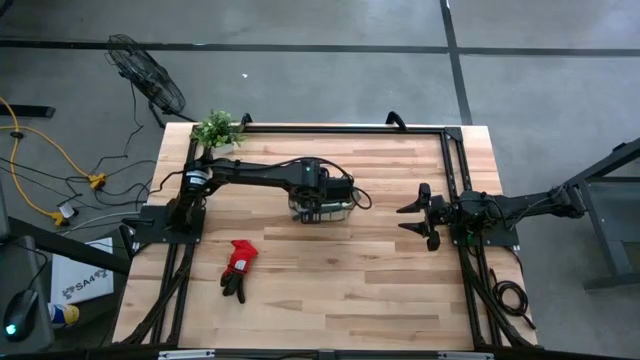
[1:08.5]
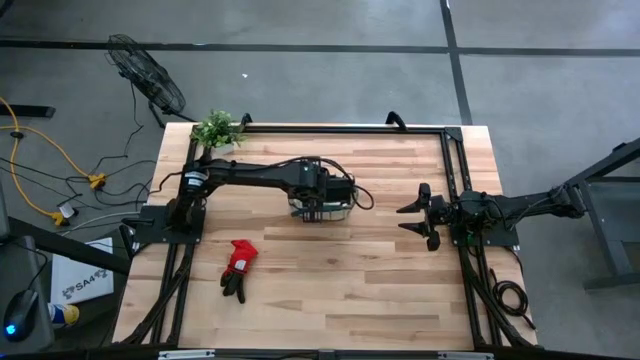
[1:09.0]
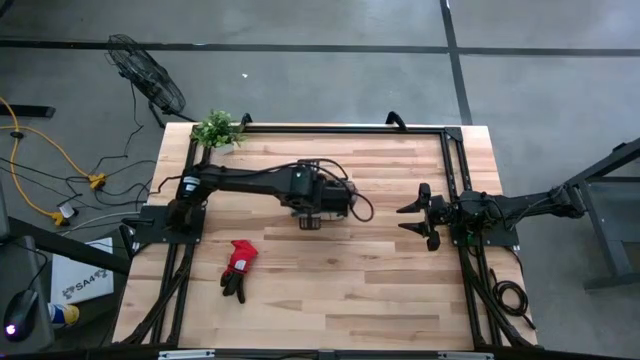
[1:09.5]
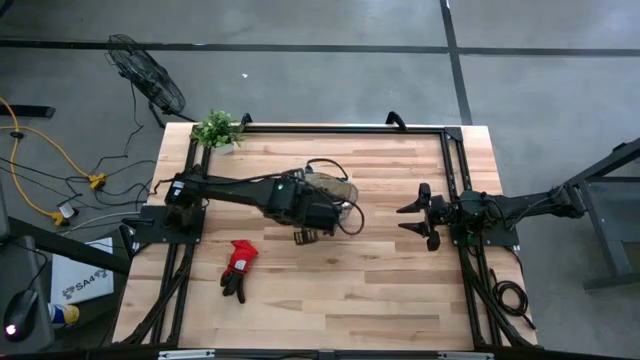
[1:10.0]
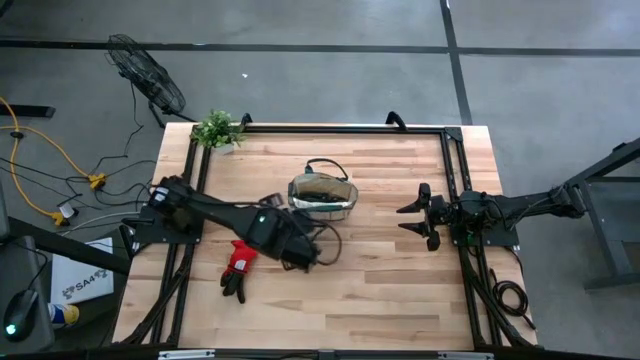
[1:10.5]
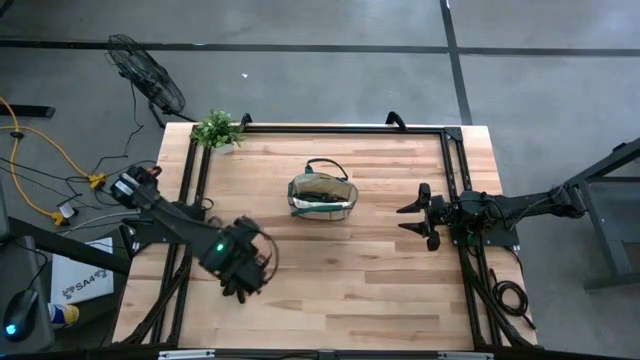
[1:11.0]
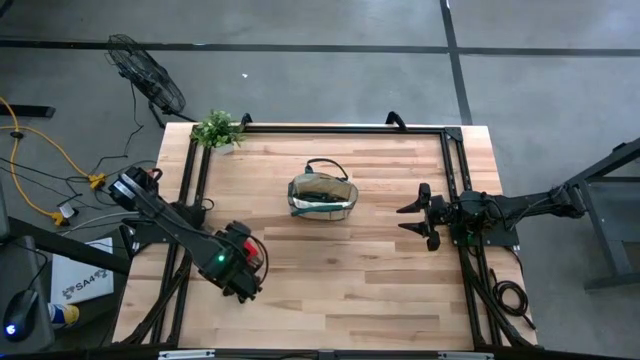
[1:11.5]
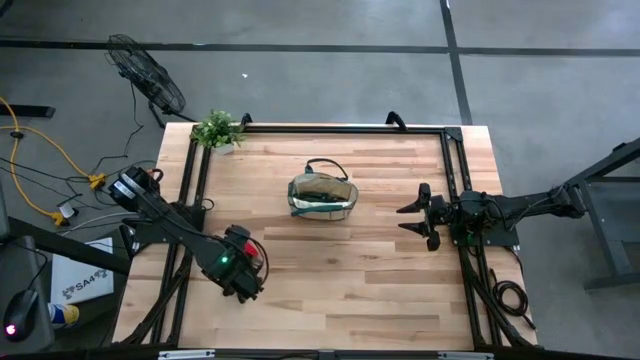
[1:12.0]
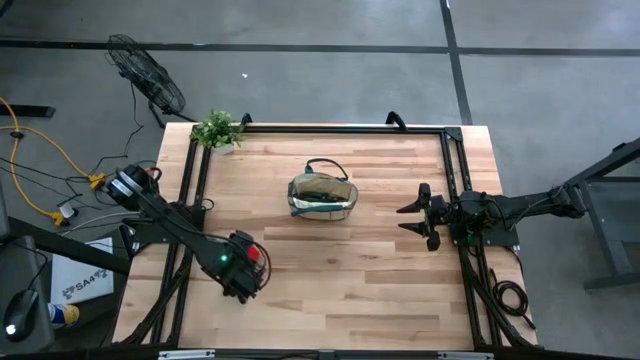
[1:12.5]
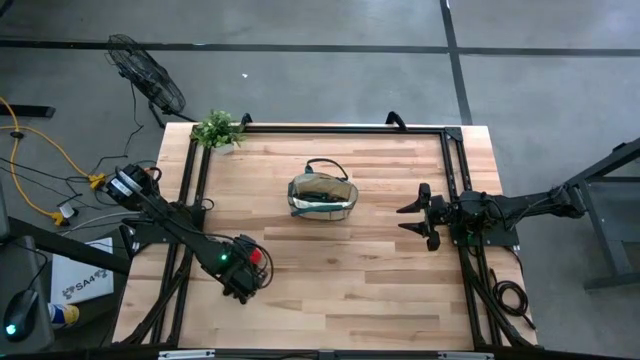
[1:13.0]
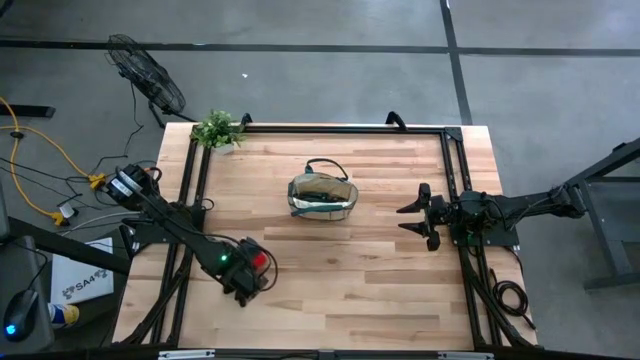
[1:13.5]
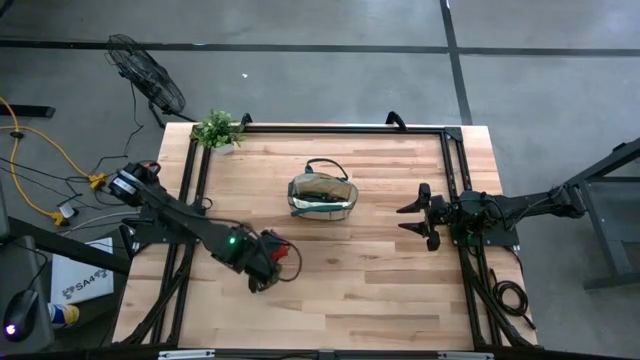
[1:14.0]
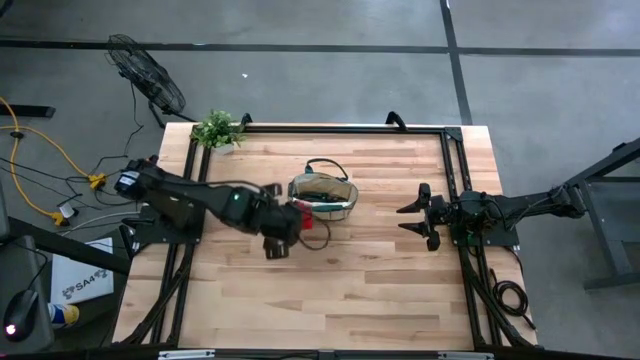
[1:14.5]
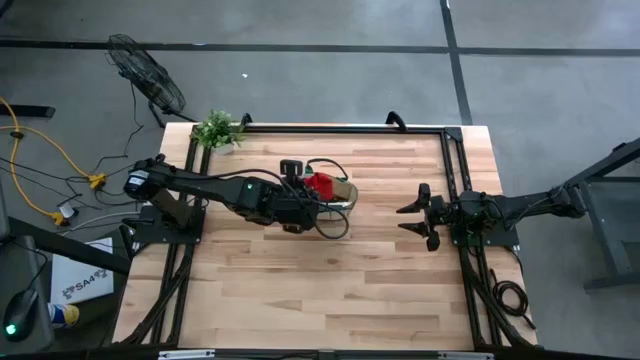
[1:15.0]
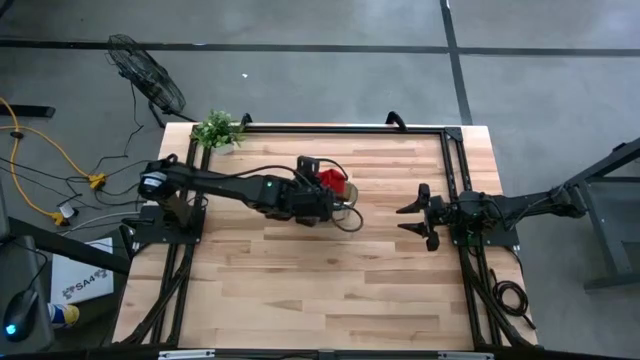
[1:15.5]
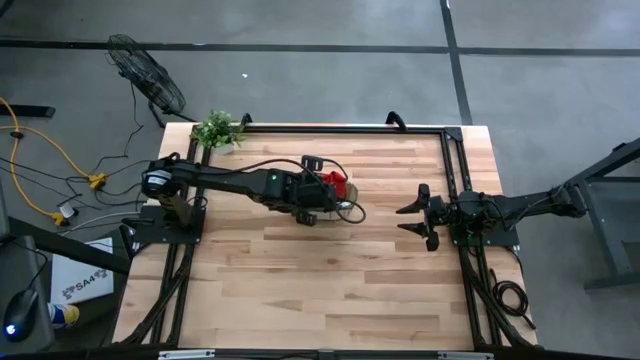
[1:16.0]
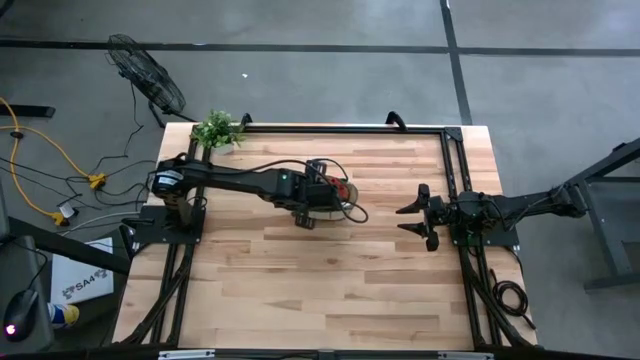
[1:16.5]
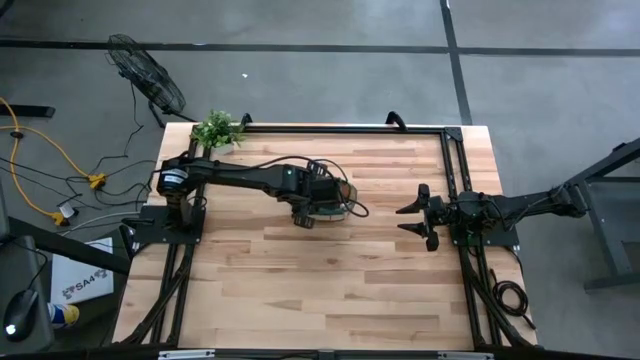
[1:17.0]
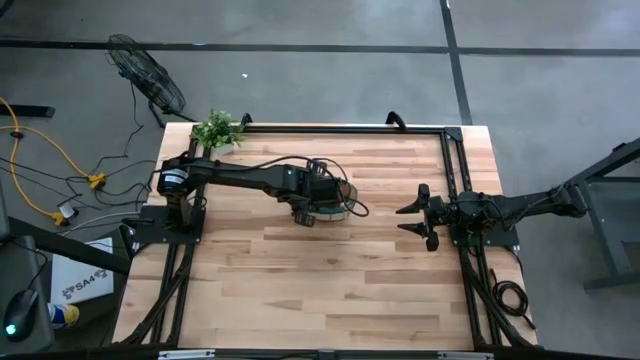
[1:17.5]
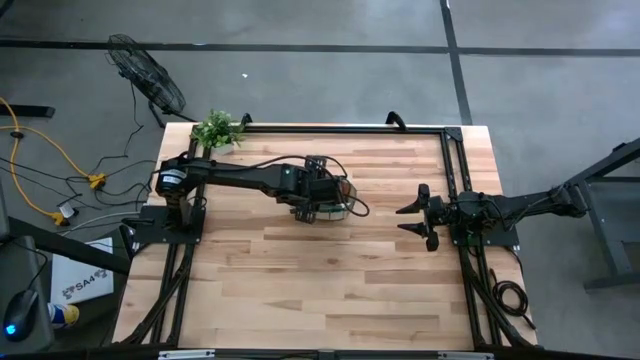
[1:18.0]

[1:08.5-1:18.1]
Task: Pick & Place Garden tools in Gardening bag
Put the red gloves into the gardening bag

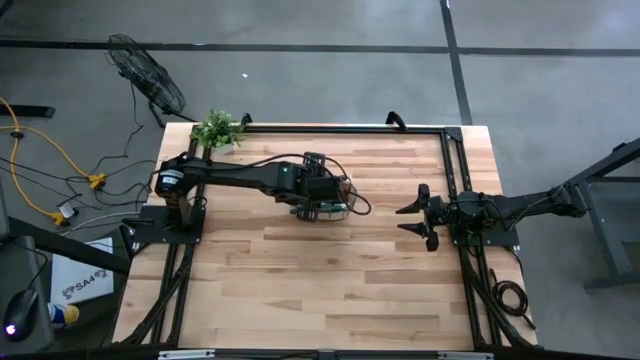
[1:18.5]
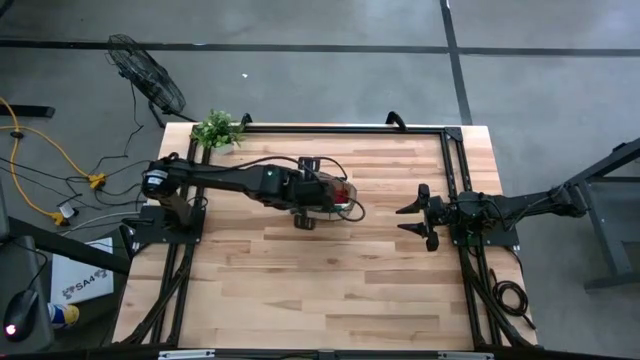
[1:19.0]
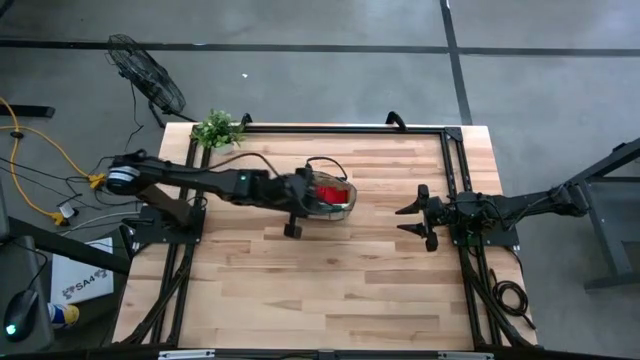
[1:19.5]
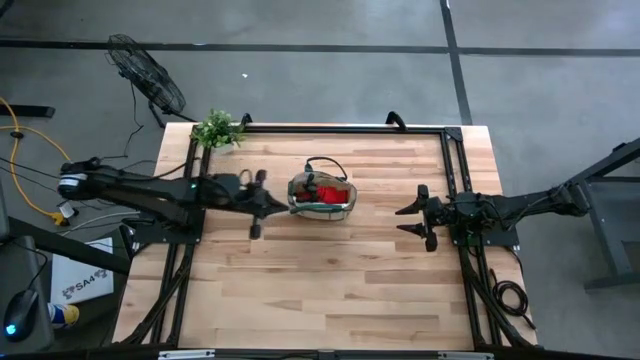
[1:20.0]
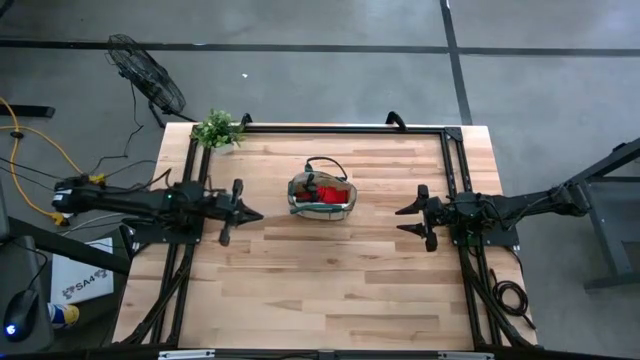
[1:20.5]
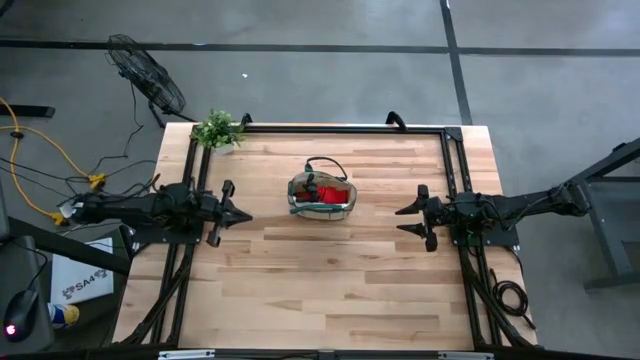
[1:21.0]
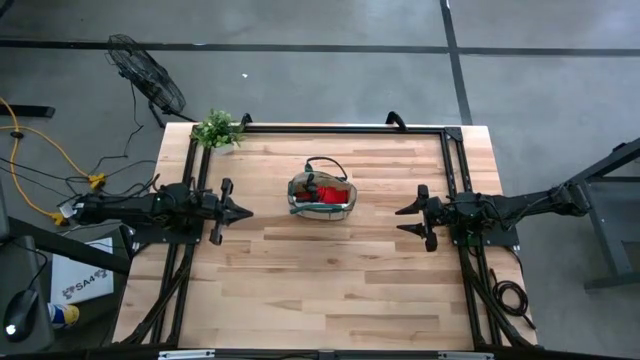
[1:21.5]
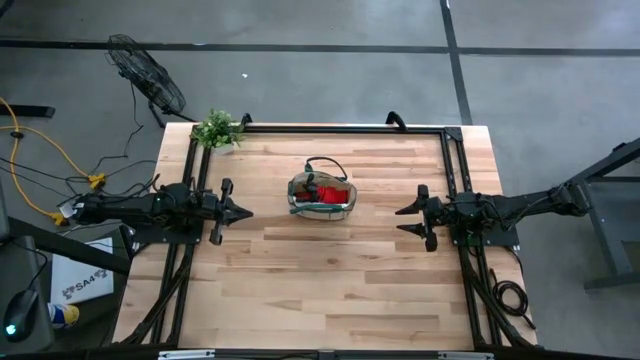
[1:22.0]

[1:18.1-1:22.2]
Return to Home Position

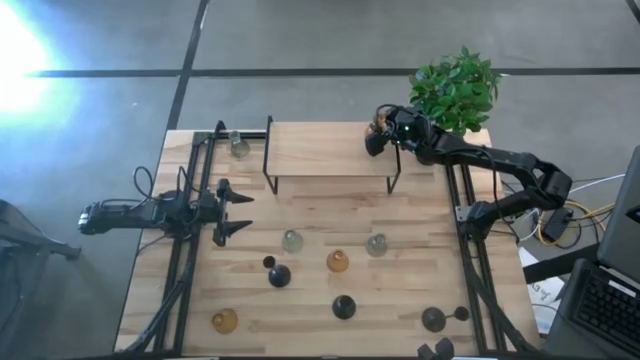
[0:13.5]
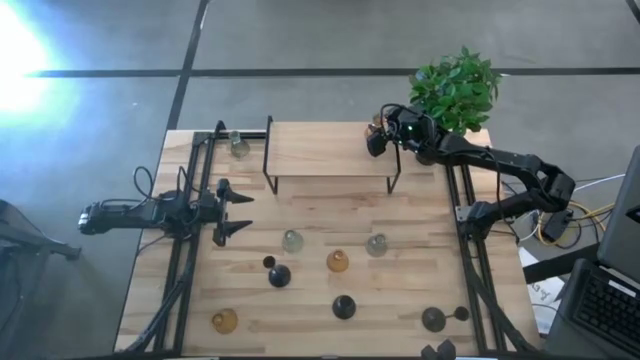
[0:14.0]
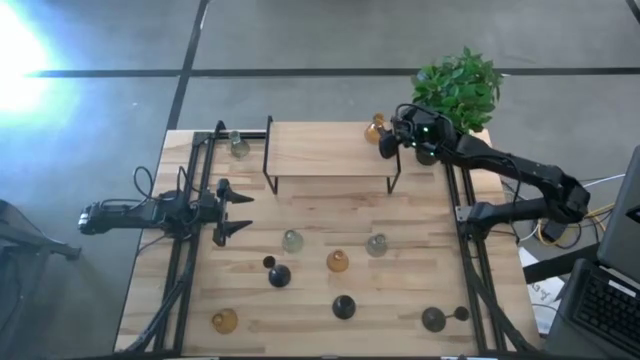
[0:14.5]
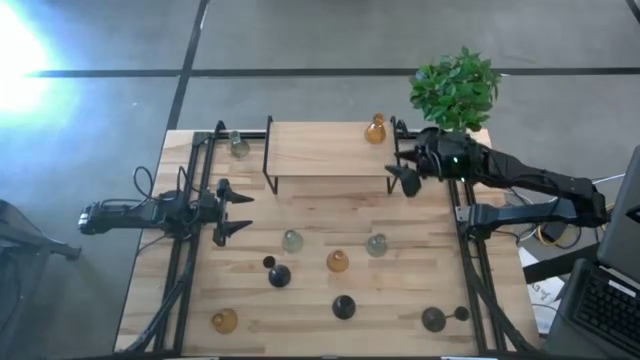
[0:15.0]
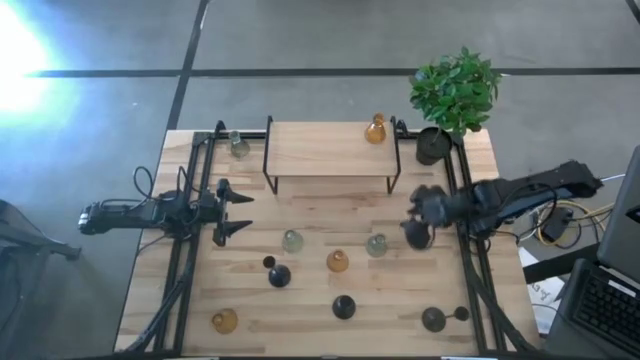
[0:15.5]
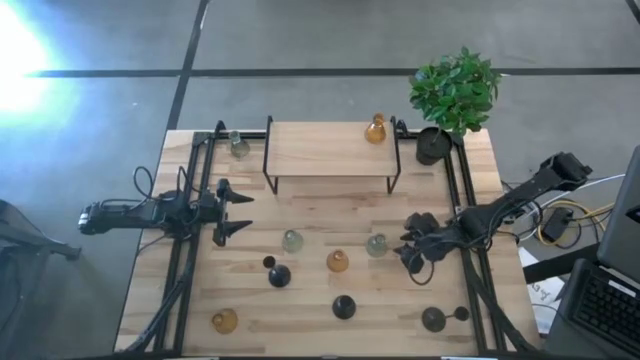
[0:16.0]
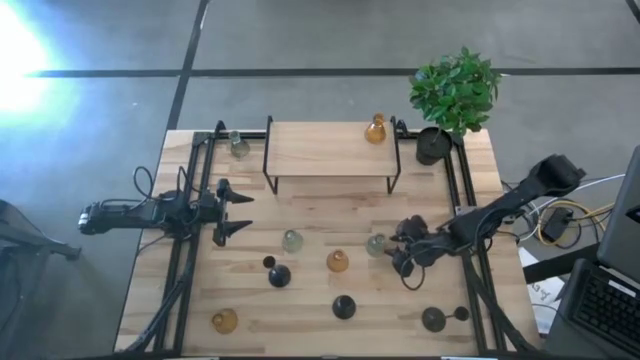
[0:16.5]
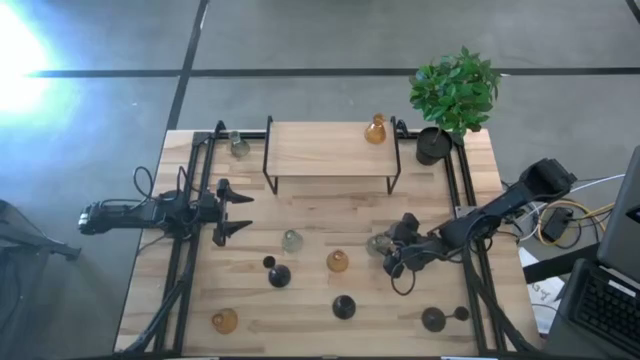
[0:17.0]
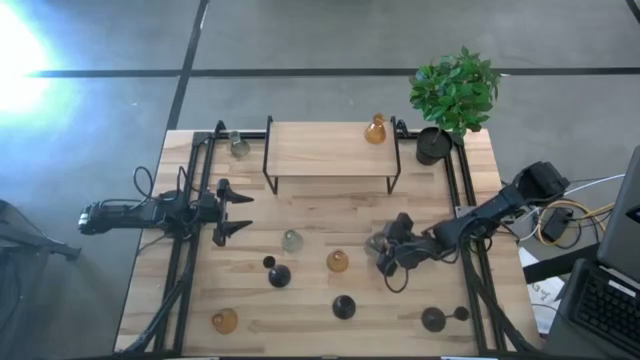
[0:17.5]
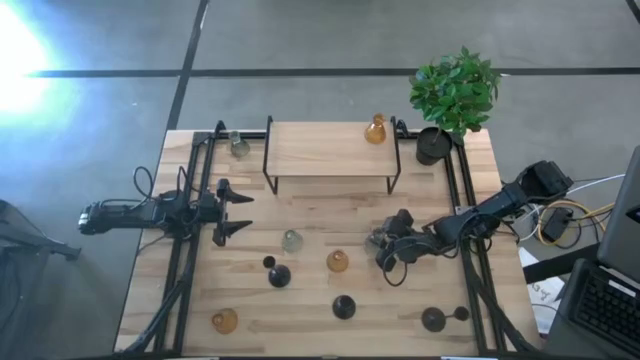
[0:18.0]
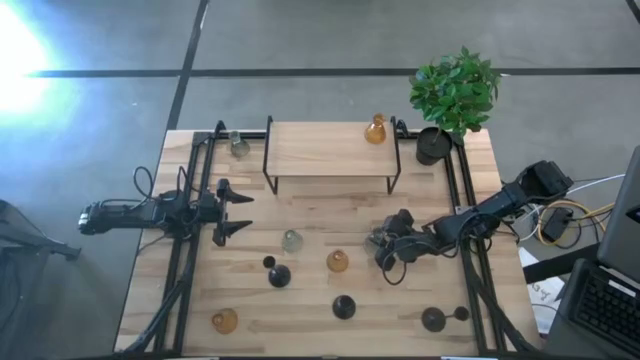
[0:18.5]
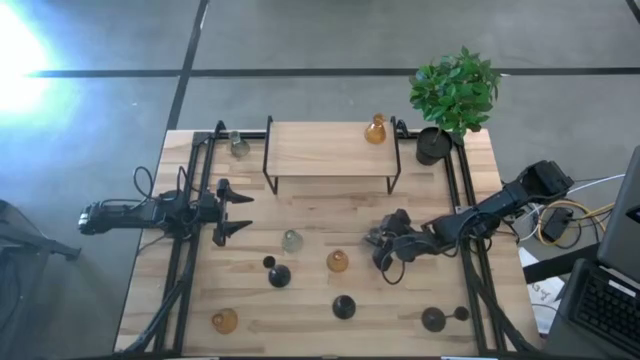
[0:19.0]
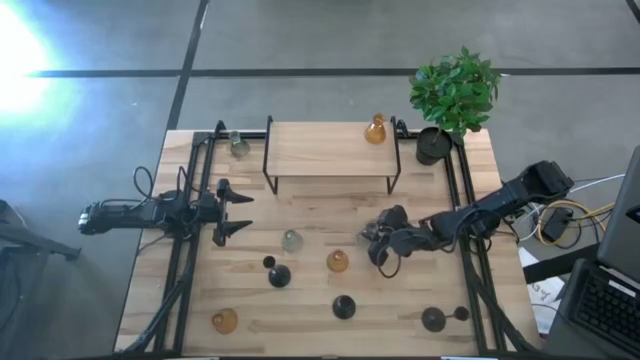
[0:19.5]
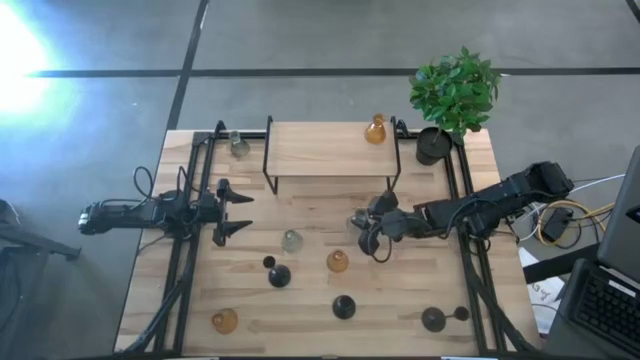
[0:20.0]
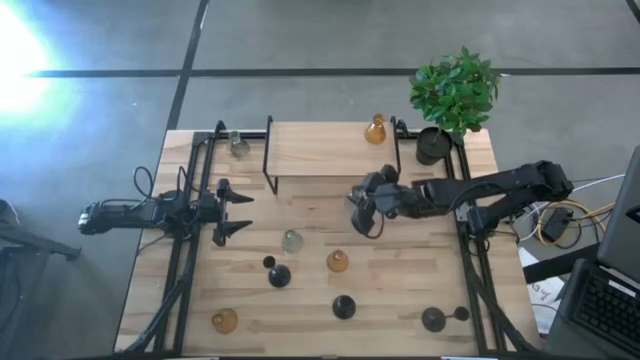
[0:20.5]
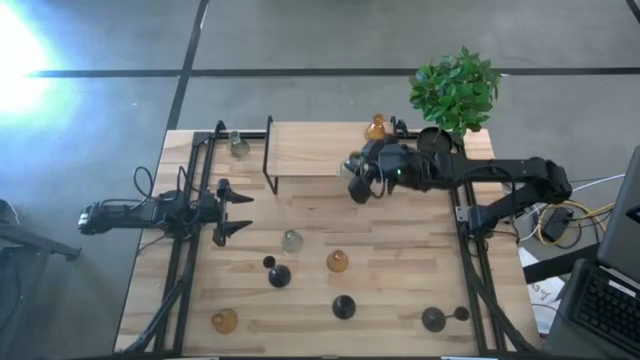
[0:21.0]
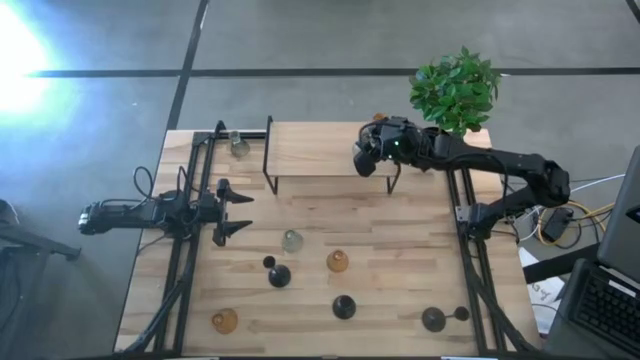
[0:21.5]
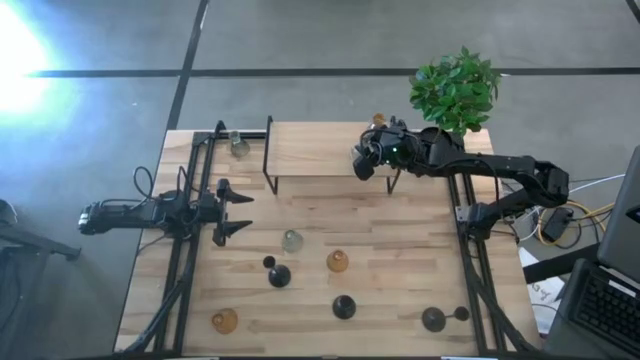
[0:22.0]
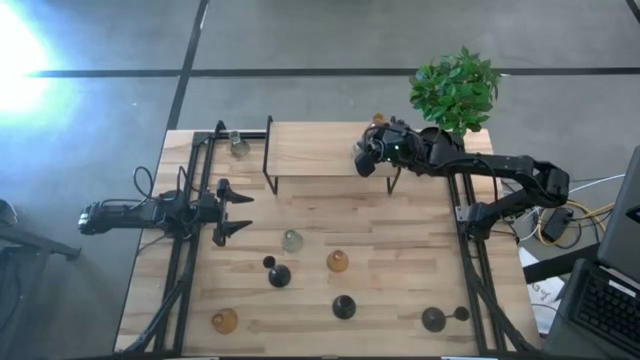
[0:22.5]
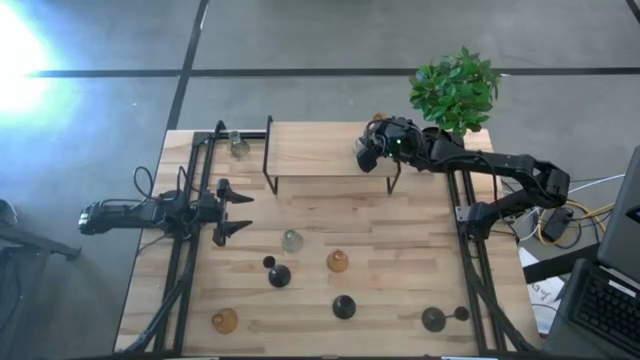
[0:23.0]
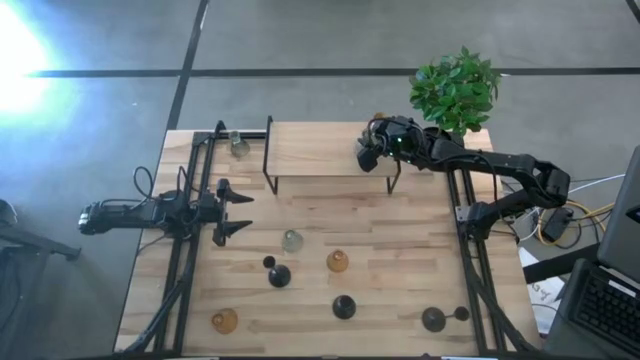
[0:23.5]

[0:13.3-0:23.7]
Task: Pick & Place candle stick holders
Put the bottom right green candle holder on the shelf
